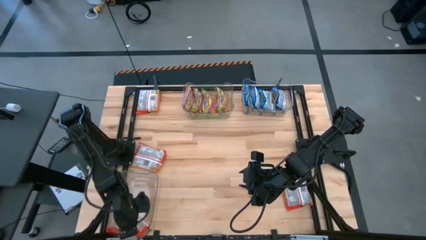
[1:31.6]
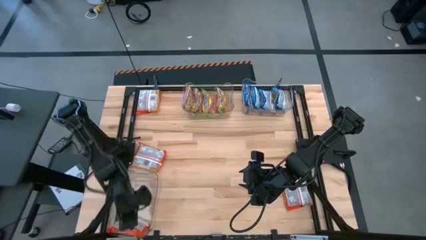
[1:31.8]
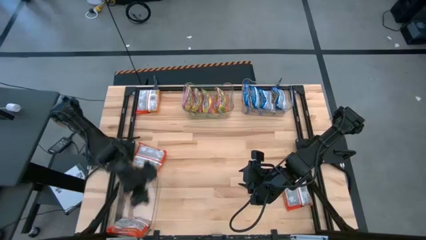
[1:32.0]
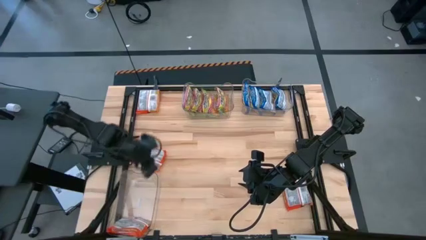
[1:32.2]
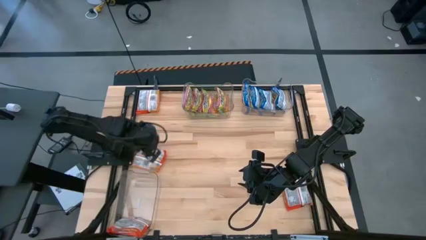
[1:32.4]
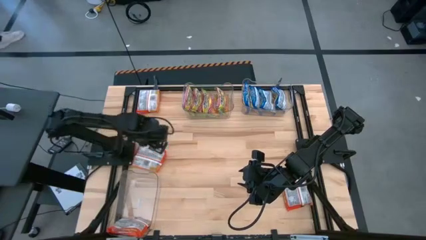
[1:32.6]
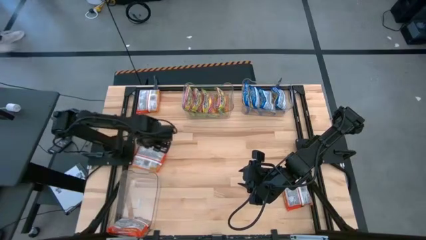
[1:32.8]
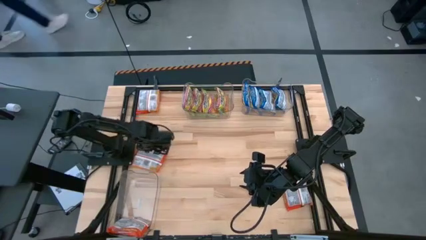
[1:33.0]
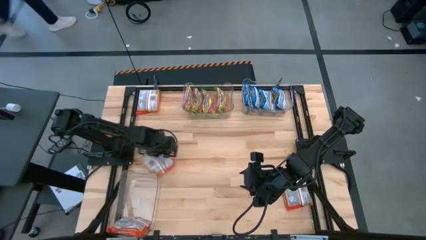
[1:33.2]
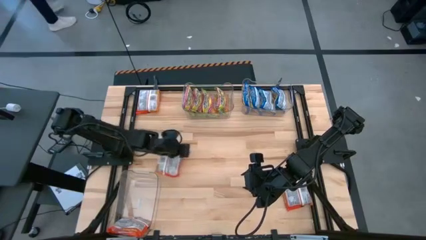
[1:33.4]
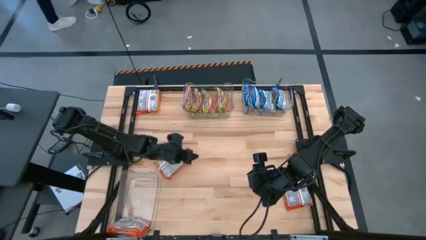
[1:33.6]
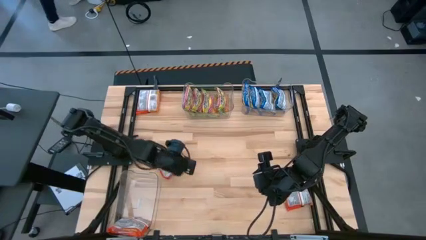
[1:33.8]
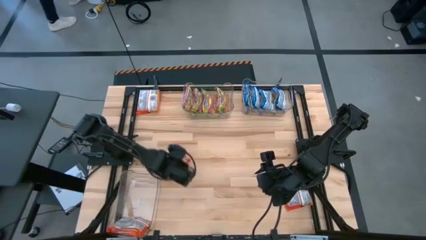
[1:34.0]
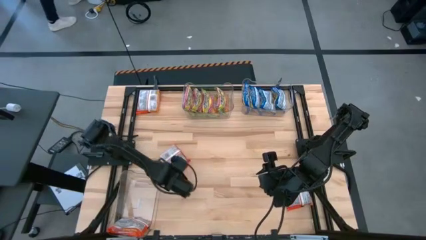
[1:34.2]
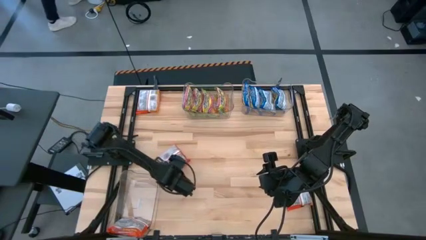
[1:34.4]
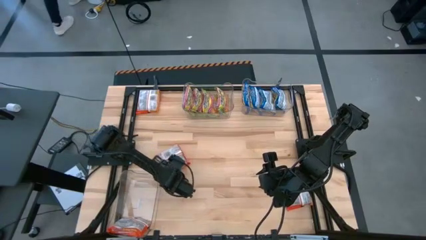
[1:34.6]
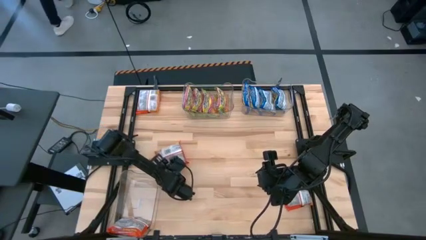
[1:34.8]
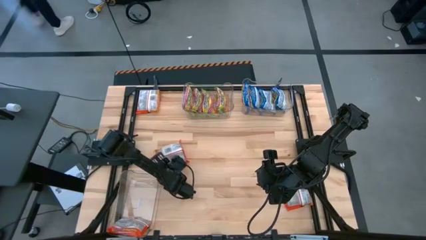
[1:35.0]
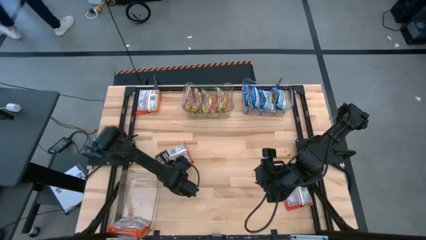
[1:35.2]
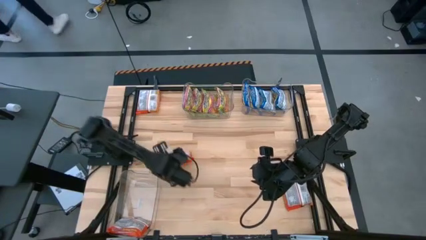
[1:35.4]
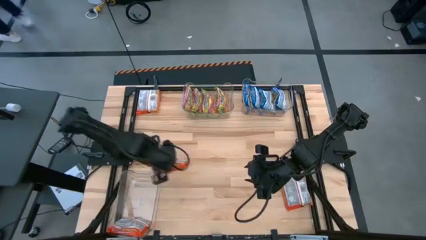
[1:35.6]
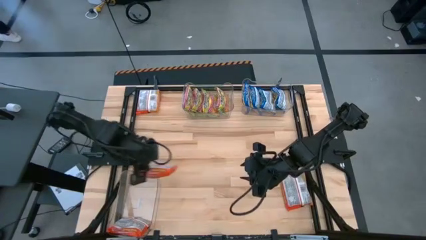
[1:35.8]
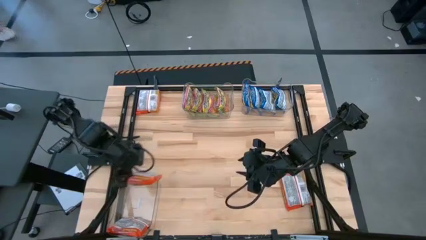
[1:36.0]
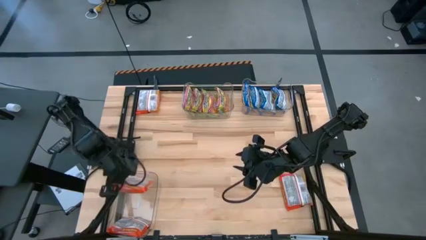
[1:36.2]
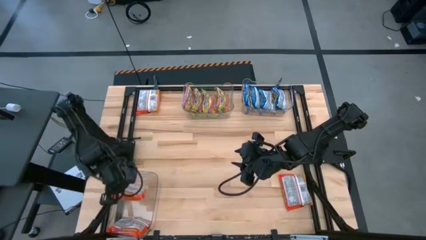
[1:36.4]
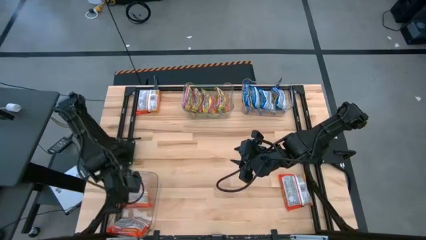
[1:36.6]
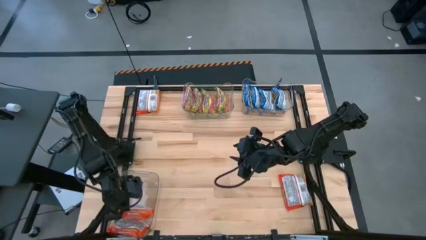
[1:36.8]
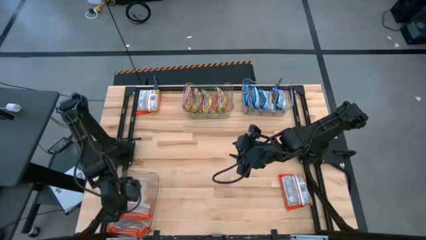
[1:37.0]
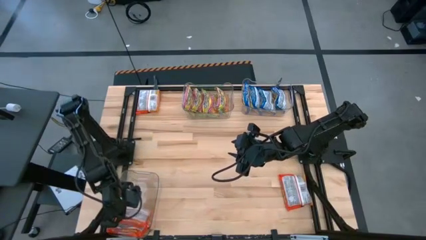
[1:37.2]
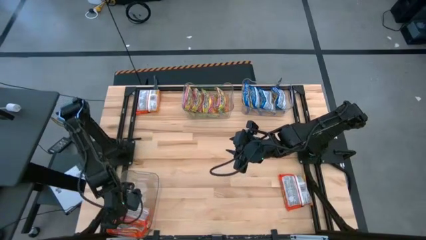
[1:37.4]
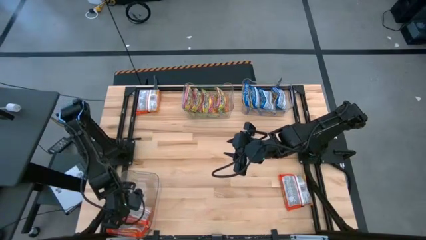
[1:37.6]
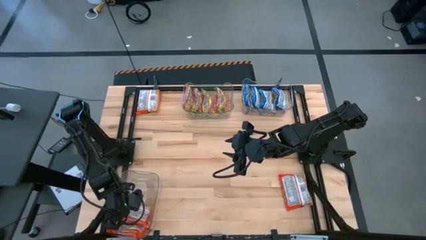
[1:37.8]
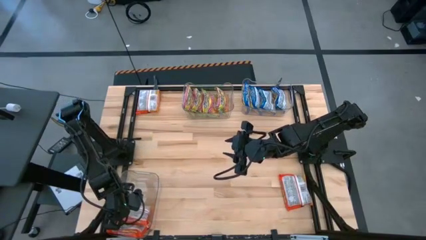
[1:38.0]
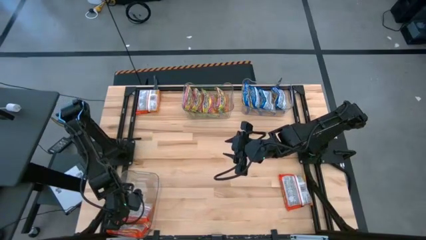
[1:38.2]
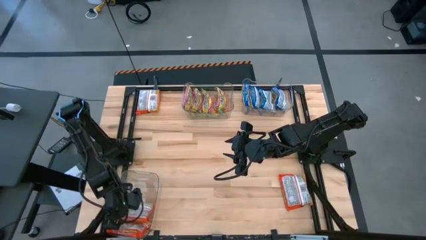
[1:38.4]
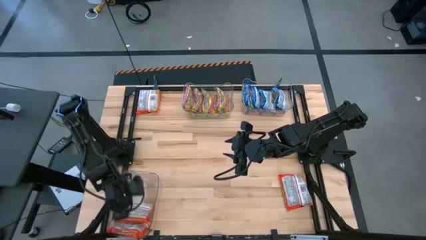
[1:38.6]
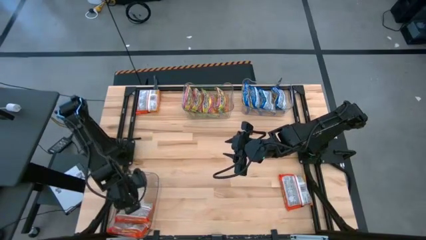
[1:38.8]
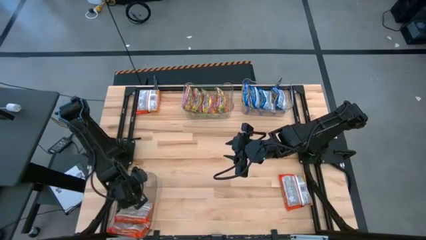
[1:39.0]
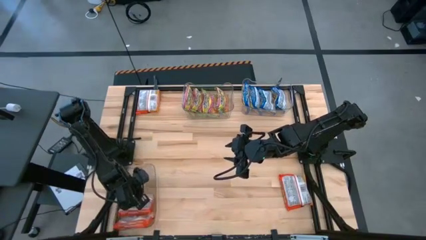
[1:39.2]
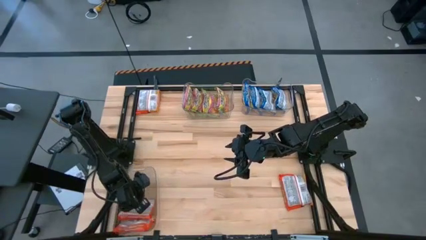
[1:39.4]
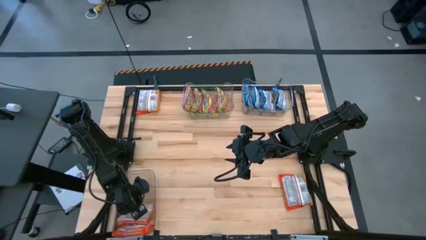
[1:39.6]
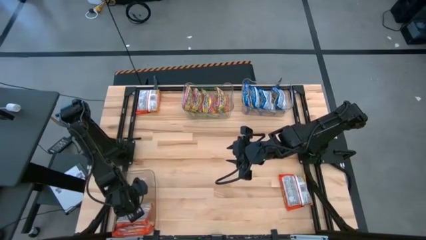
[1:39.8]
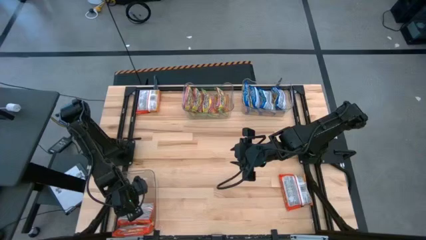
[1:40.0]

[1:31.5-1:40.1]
Task: Sort Maruchan noodles
Put the orange noodle pack into the bottom transparent bin

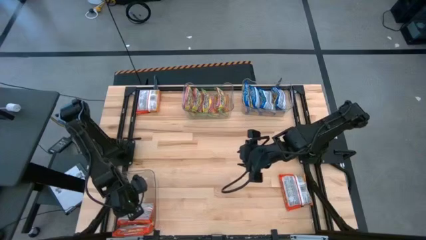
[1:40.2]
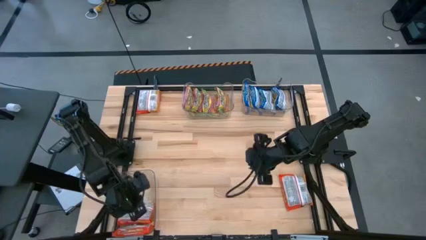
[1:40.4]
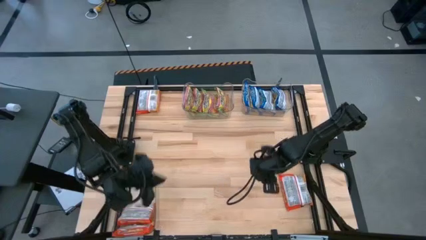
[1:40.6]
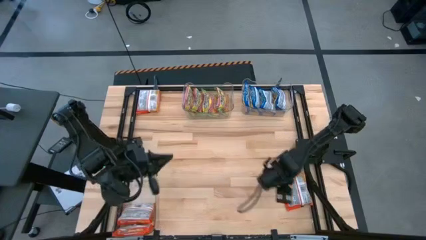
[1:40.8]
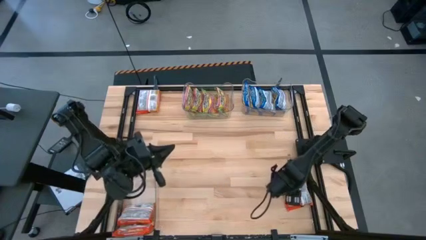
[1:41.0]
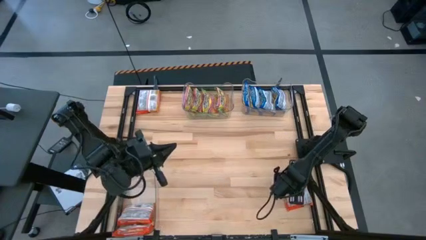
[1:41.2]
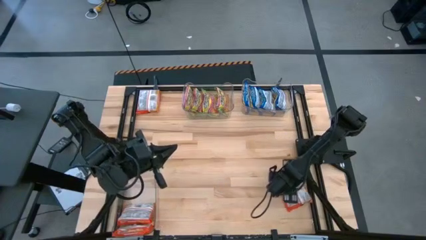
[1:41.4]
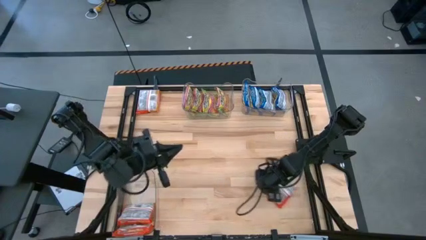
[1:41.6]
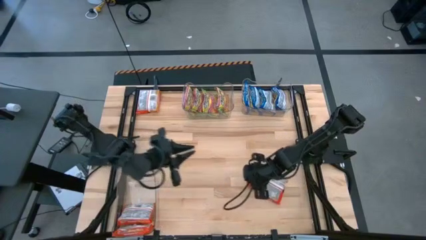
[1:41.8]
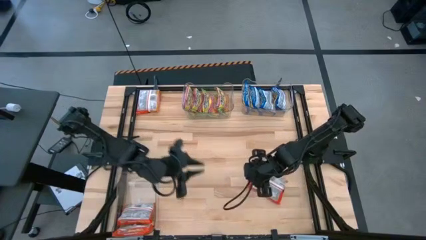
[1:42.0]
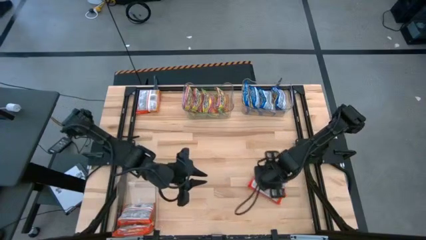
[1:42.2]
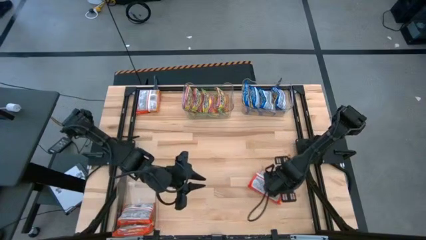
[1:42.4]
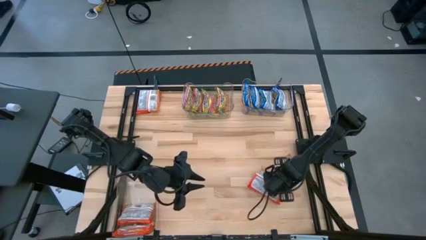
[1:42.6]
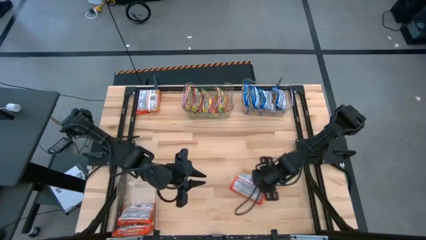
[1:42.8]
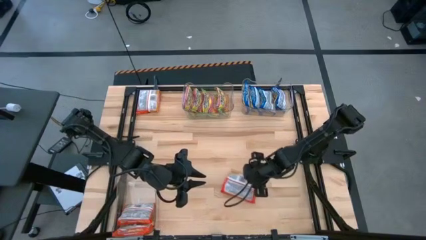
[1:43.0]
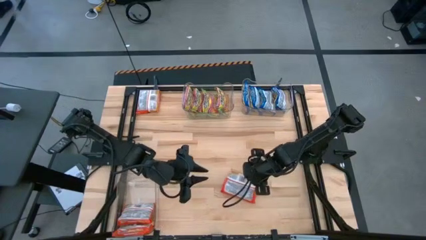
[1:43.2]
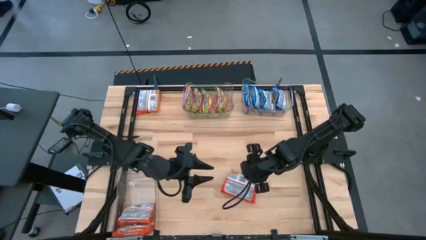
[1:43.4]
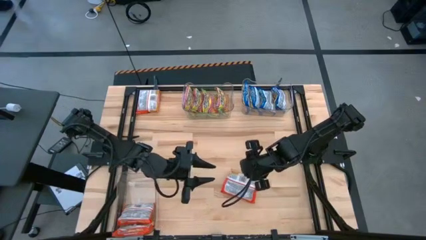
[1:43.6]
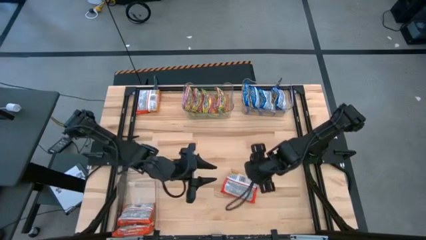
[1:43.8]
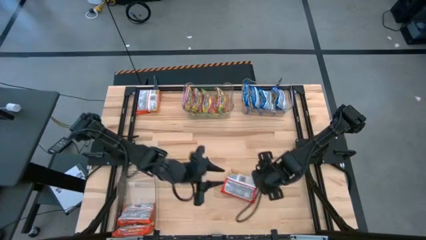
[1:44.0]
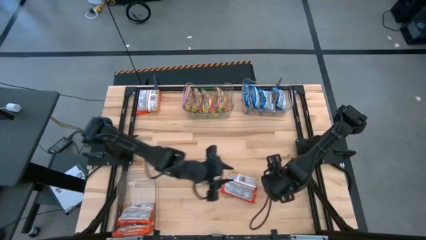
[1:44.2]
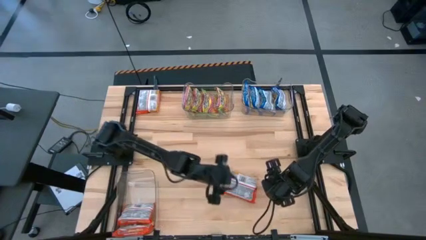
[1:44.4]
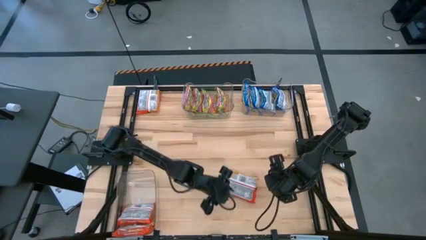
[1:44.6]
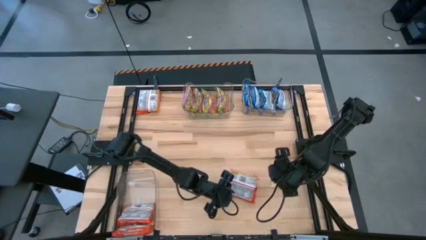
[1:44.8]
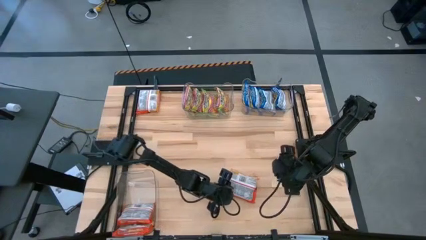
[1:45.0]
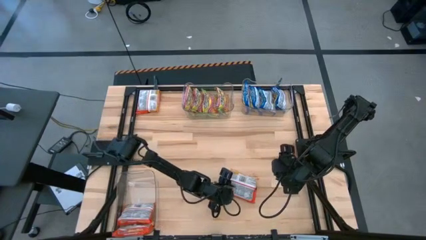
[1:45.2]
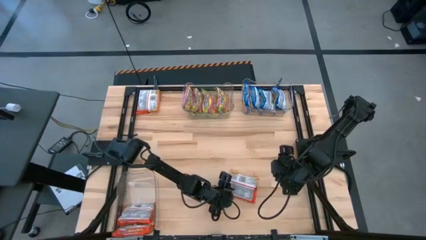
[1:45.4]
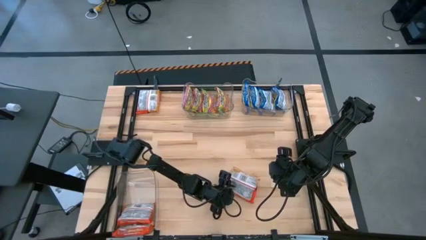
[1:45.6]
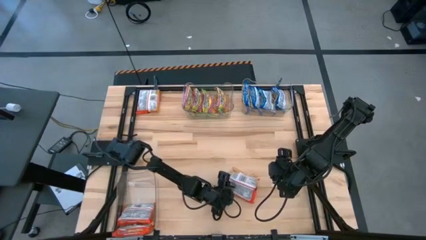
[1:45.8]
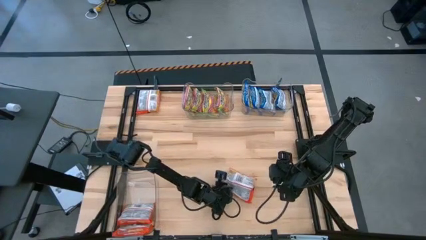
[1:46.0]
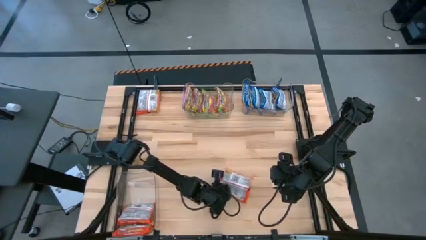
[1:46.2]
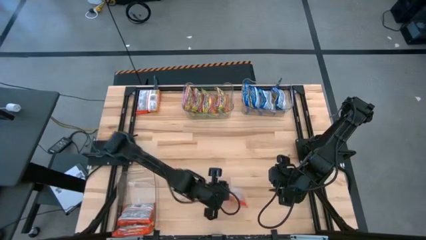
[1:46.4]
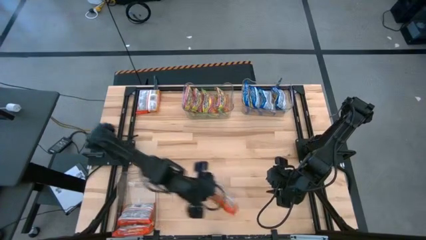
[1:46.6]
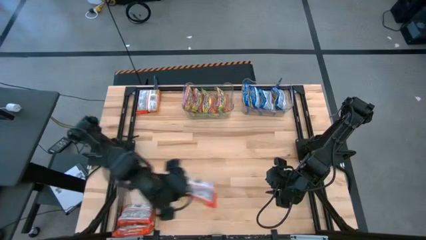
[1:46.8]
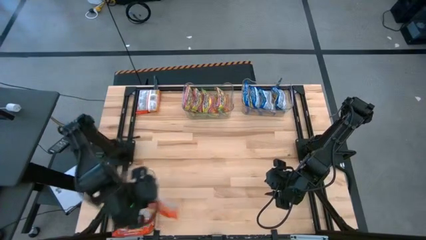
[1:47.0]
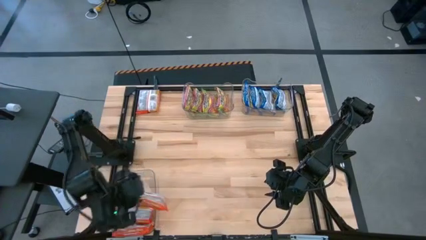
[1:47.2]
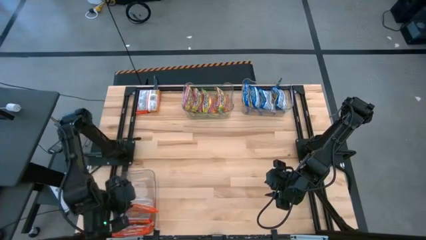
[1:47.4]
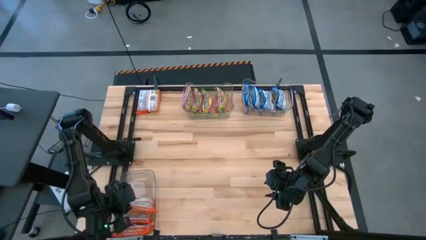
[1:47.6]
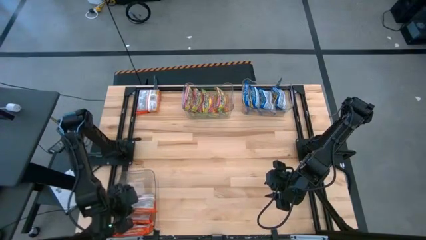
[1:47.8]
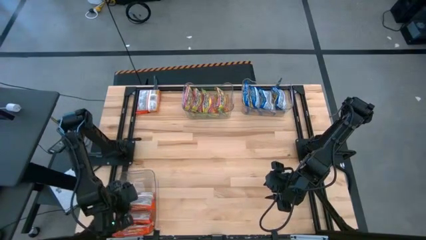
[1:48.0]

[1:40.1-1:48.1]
Put the orange noodle pack into the bottom transparent bin
